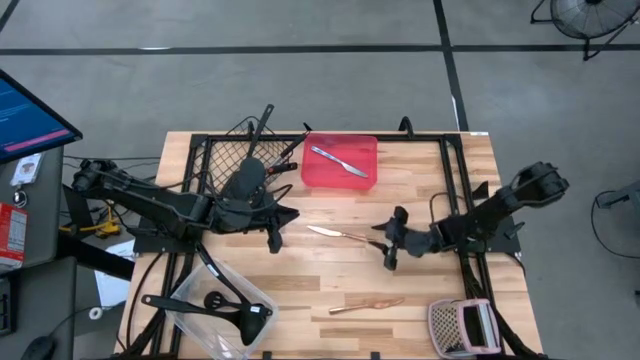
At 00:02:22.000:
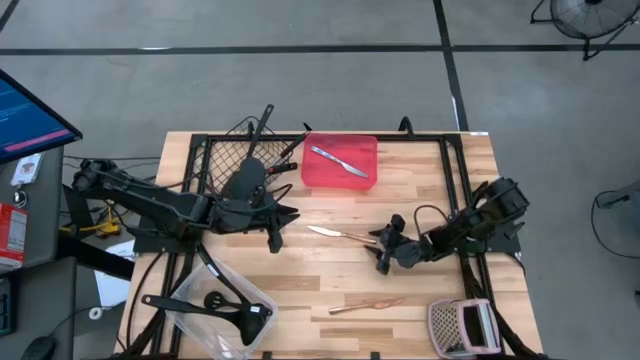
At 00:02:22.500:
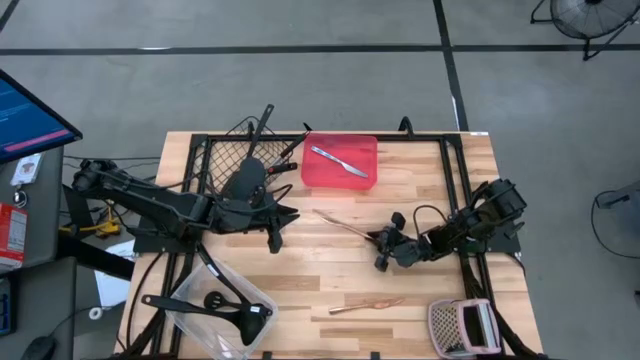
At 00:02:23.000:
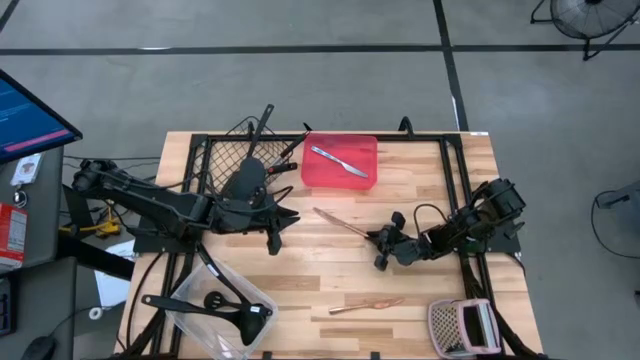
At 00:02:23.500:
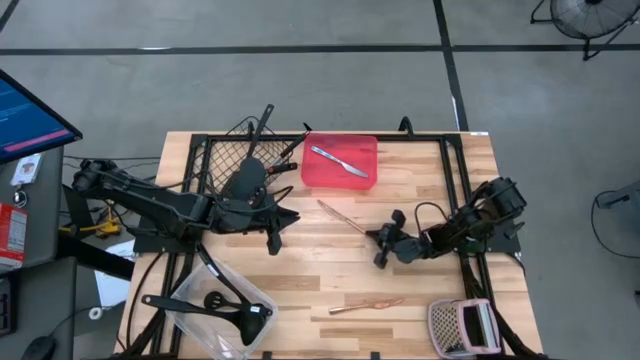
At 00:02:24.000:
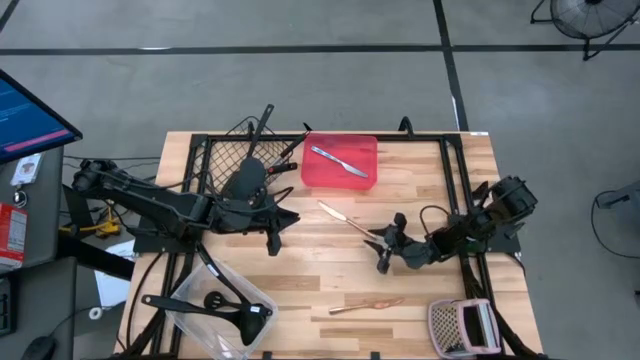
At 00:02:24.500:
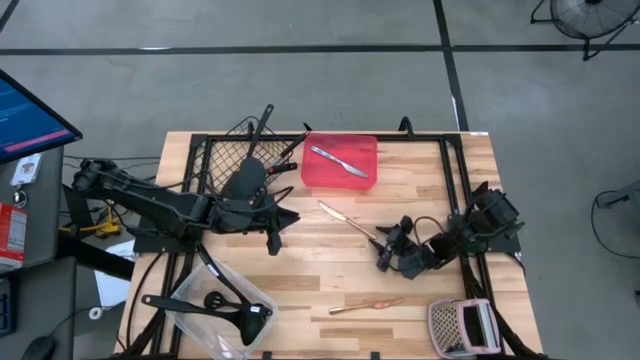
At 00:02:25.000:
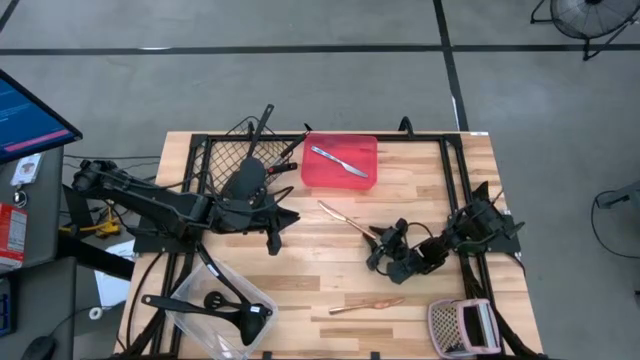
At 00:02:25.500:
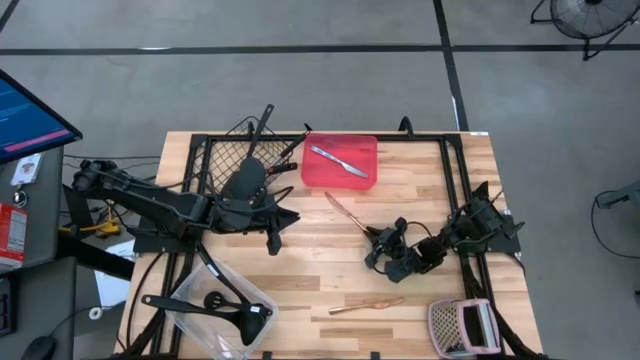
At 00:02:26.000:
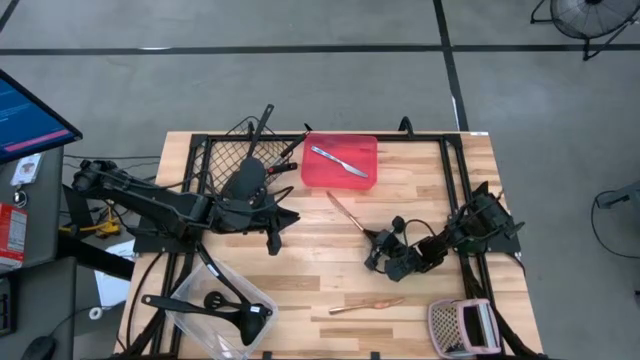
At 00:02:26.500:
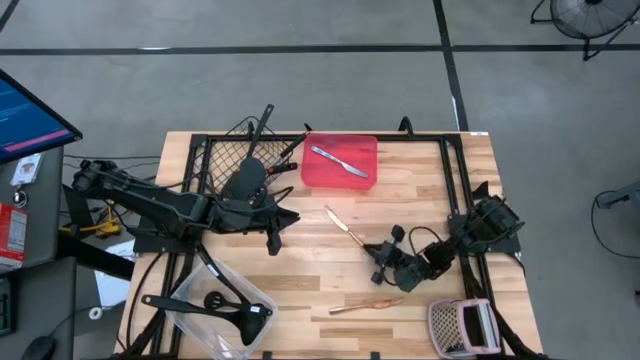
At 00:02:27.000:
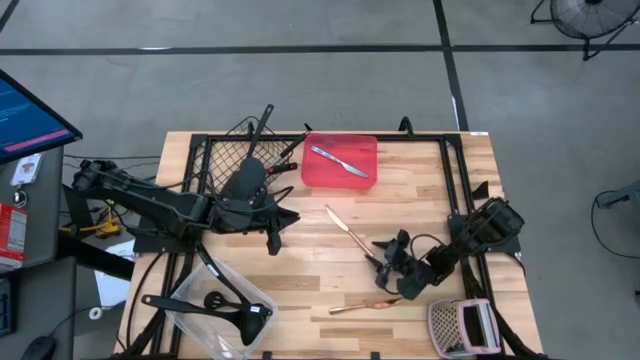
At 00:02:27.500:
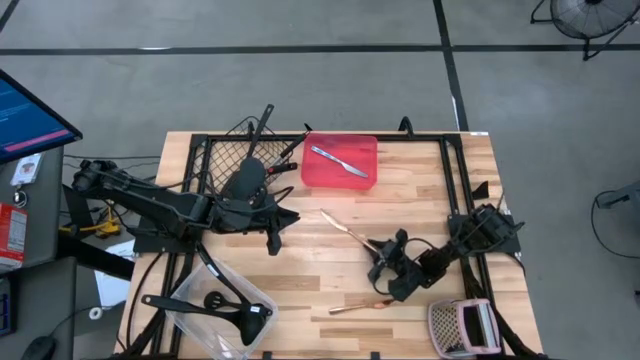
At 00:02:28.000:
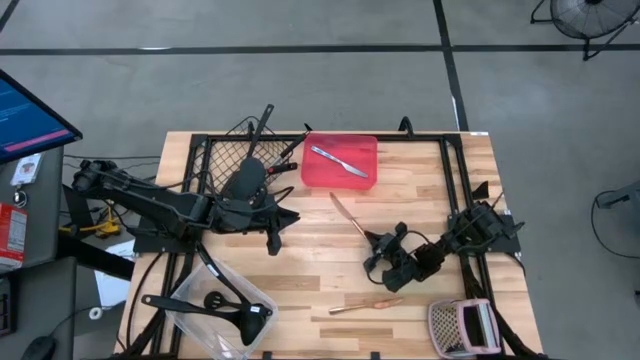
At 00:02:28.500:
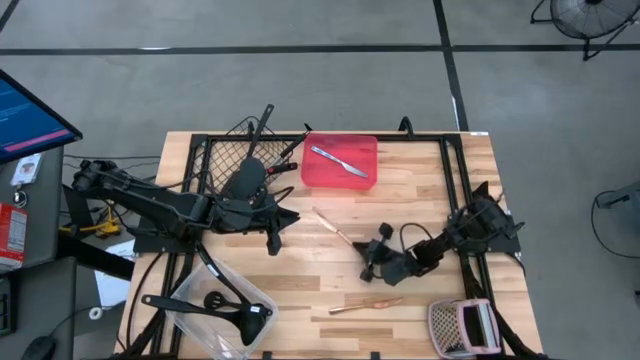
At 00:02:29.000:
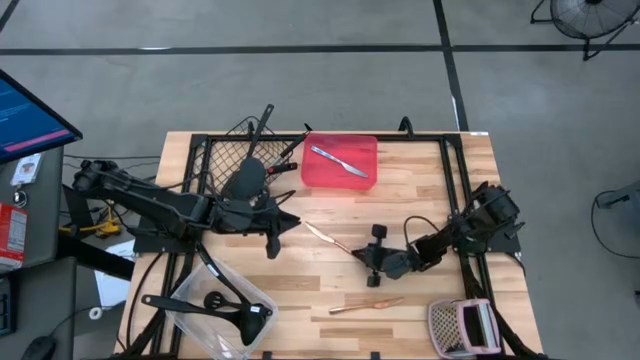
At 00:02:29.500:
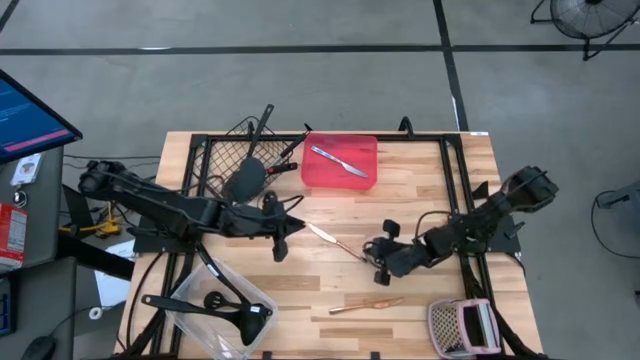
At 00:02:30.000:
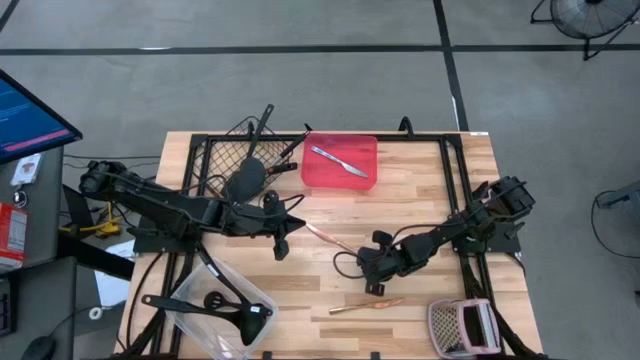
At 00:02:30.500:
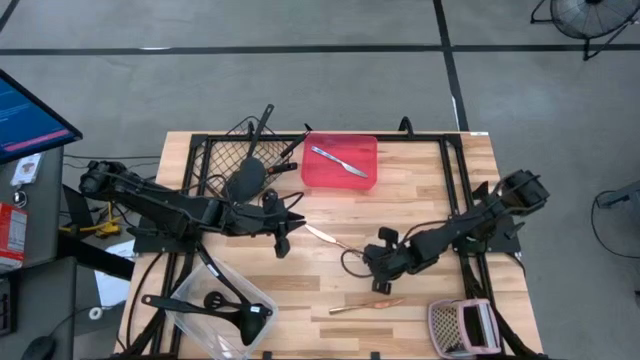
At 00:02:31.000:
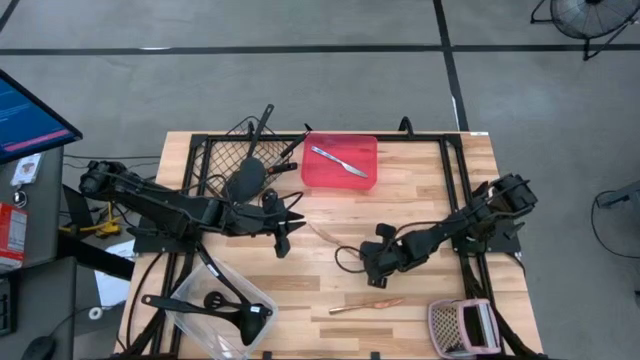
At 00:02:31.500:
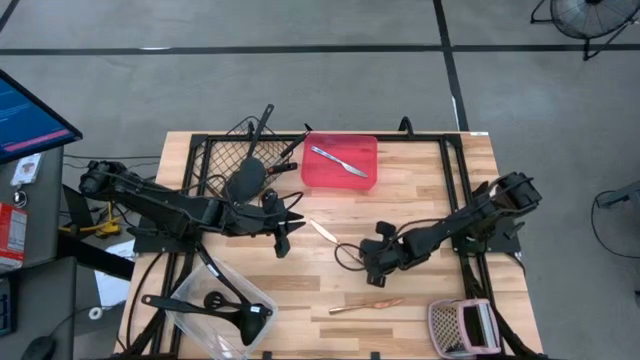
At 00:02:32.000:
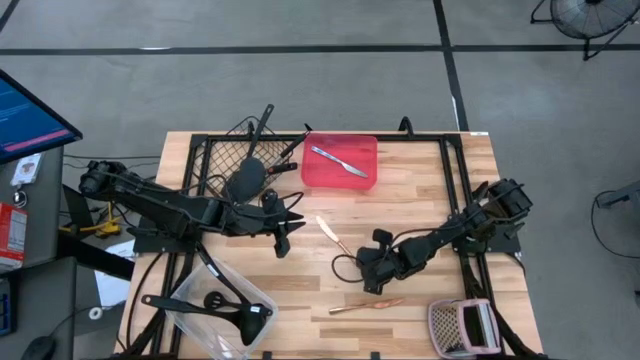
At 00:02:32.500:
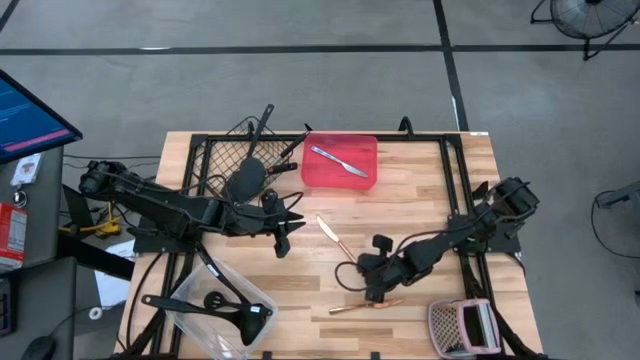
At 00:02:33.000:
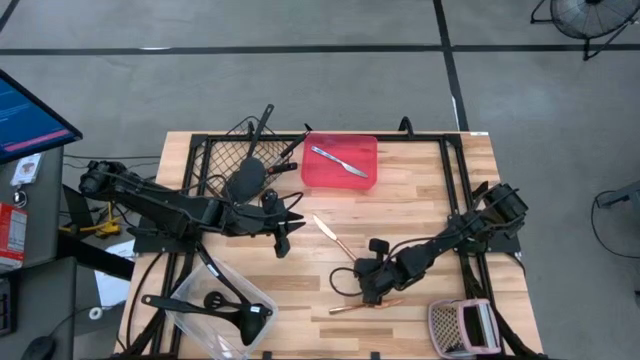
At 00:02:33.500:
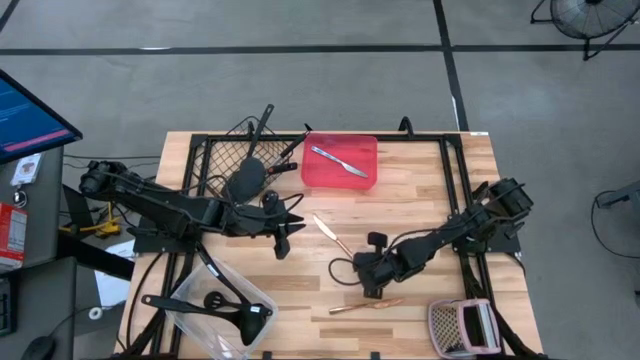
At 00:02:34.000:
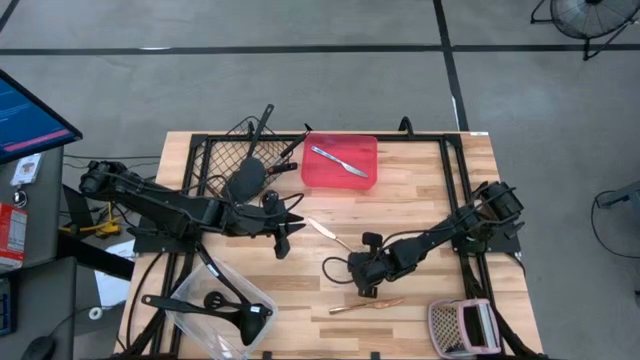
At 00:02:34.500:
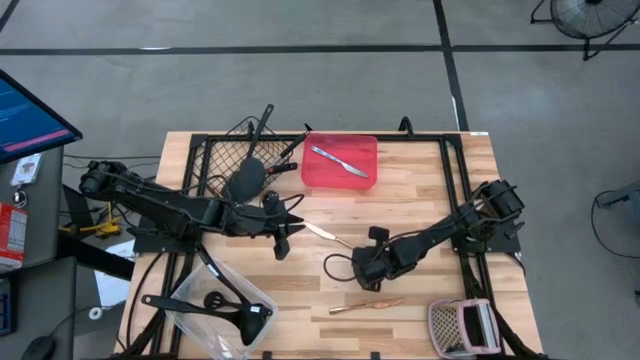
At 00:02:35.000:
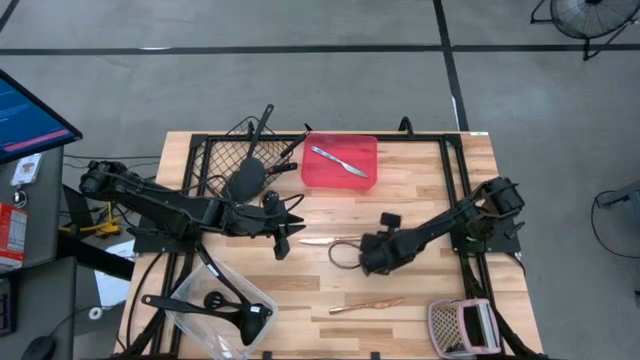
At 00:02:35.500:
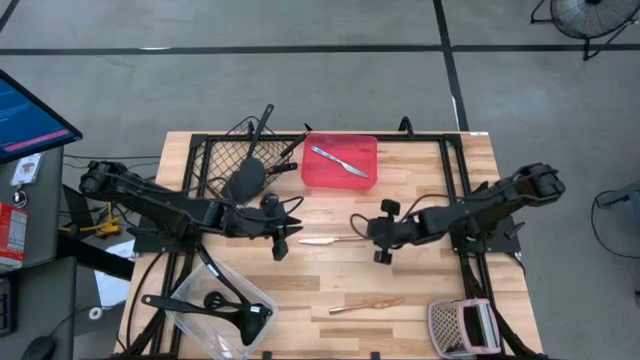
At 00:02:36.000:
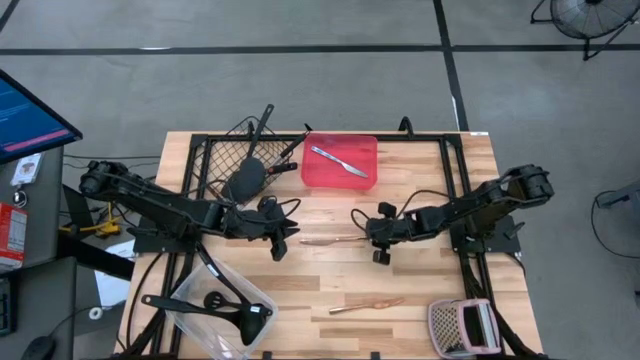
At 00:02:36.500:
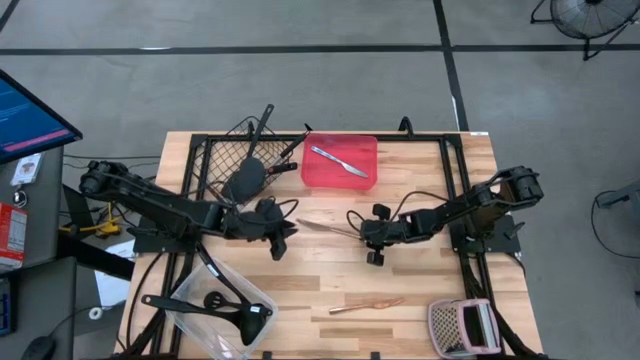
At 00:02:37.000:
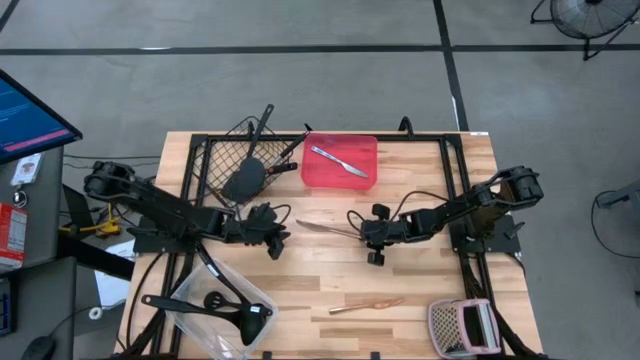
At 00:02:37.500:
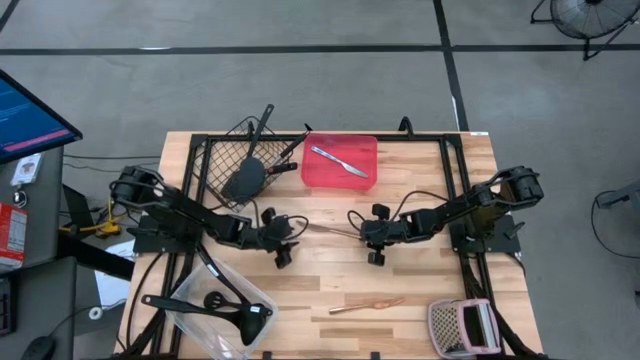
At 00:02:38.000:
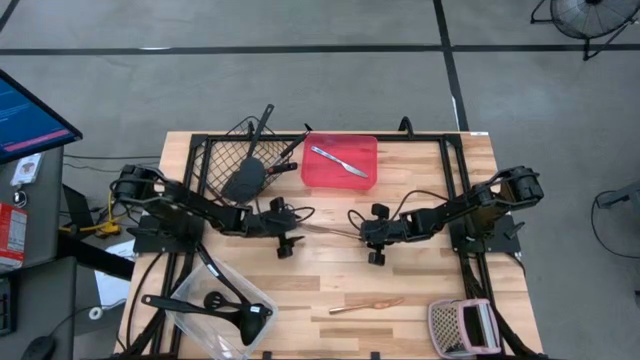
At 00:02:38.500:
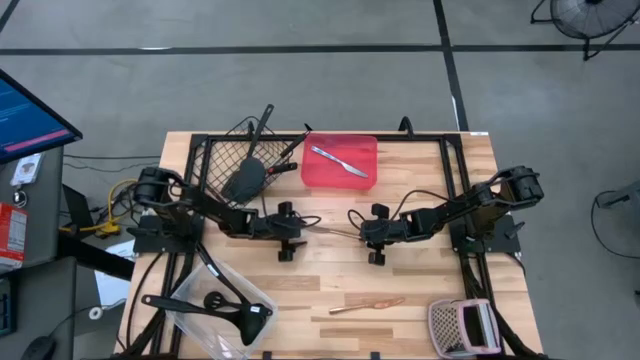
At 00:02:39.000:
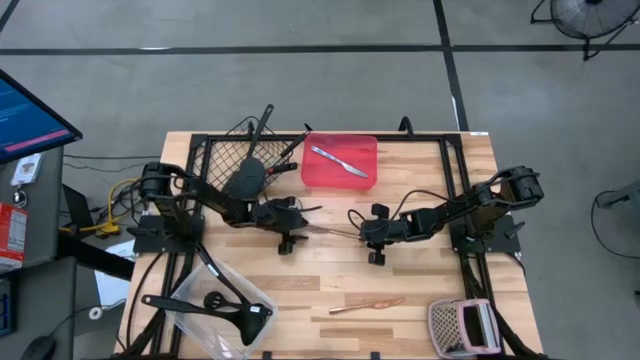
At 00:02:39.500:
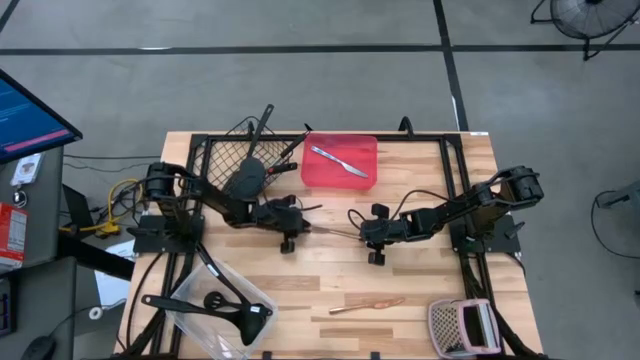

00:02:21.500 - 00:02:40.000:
Task: Pick & Place Kitchen Items
Put the gold table knife into the red bin

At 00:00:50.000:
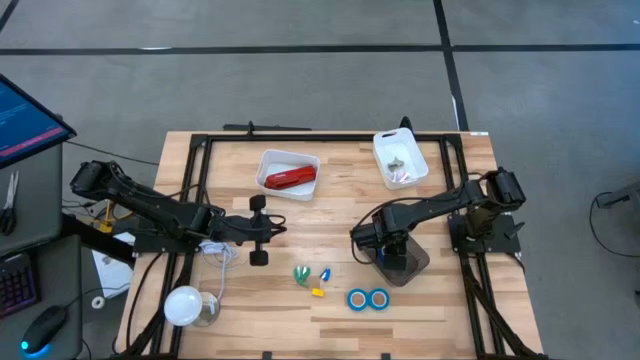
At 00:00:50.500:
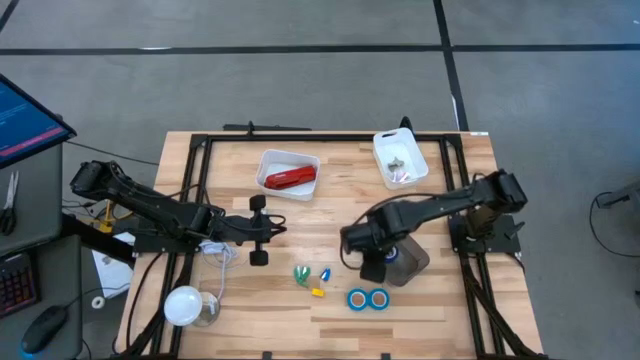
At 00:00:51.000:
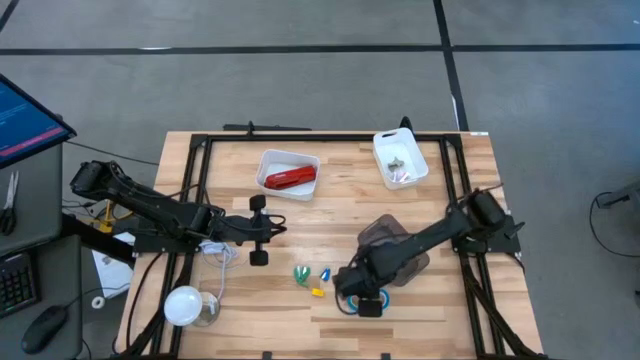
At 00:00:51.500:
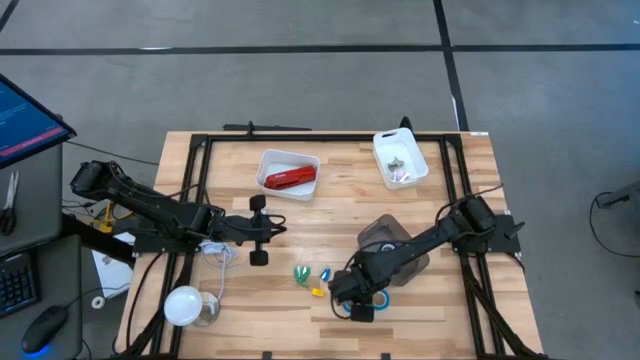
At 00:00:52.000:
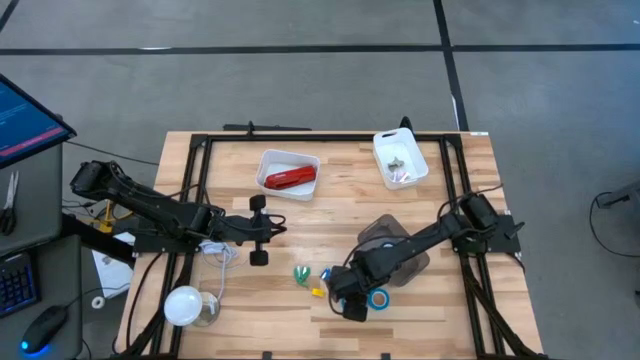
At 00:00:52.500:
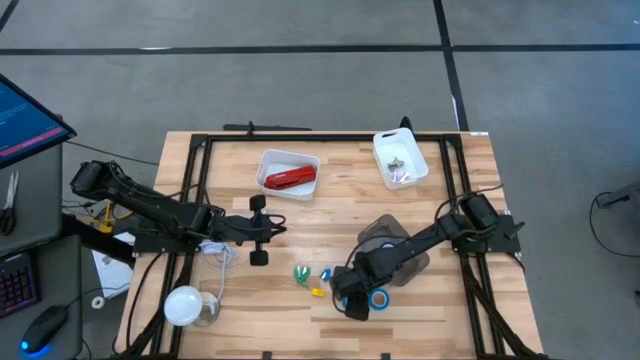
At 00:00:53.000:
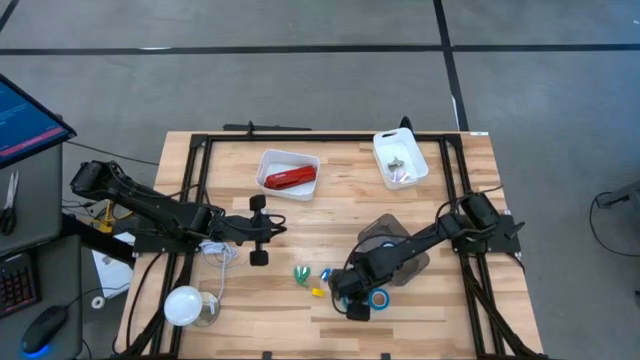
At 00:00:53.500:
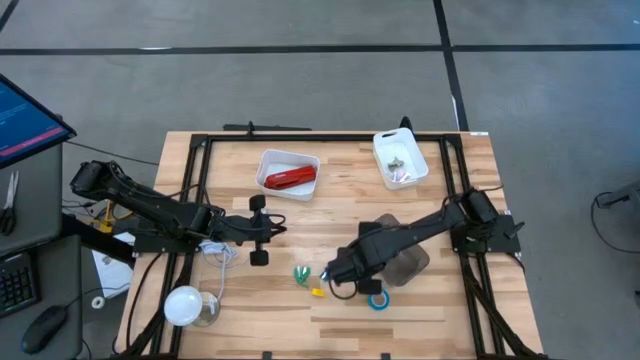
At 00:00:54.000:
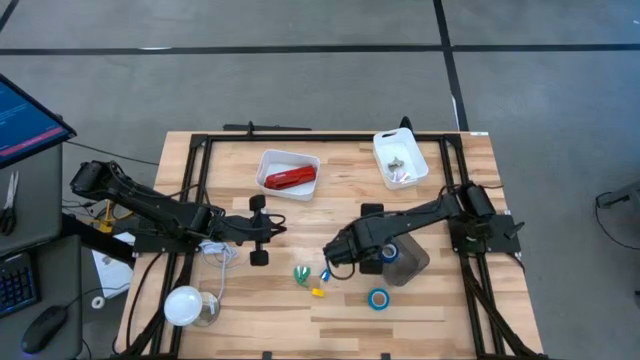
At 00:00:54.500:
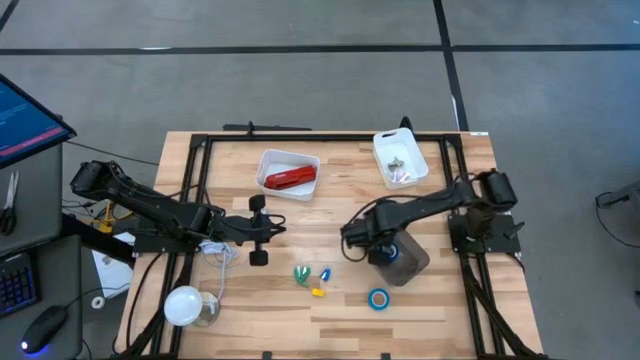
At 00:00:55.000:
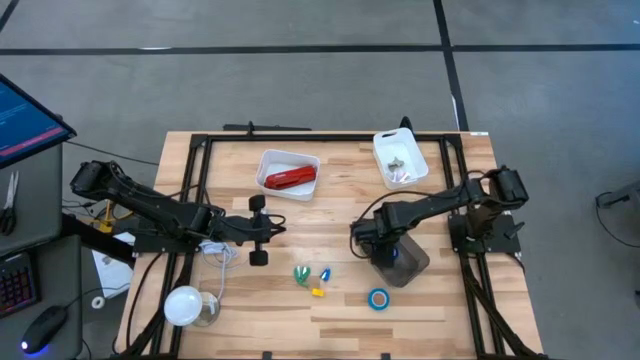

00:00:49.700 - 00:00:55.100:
Task: Pick and place Stapler, Stapler remover, tape
Put the left light blue tape into the black bin
